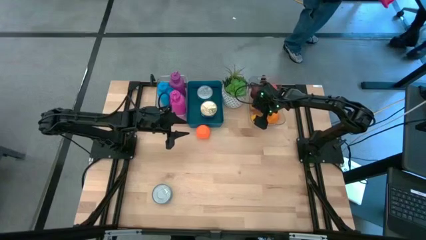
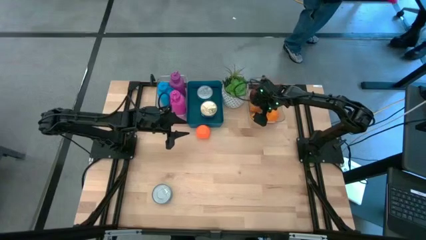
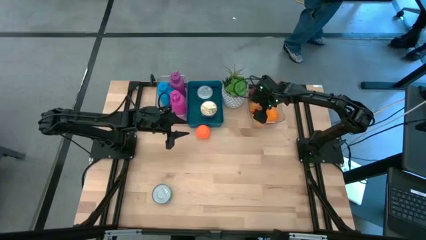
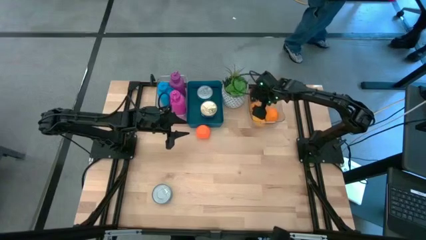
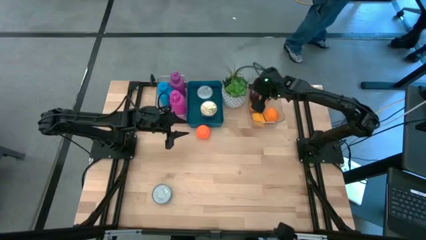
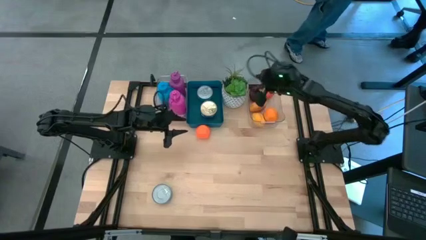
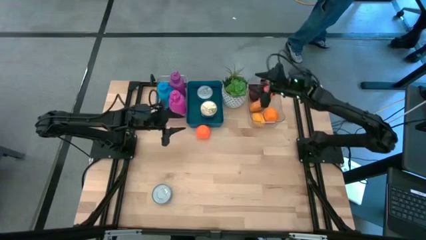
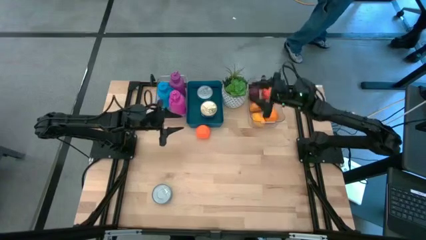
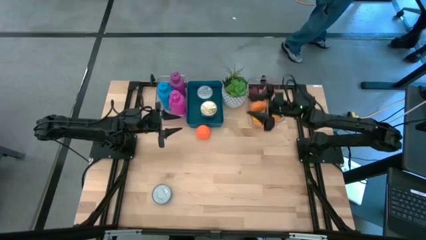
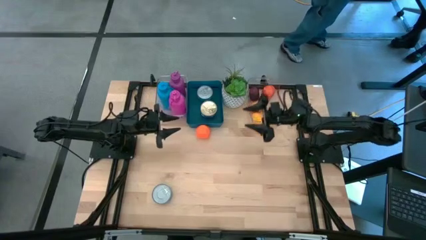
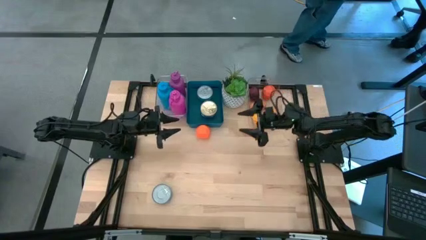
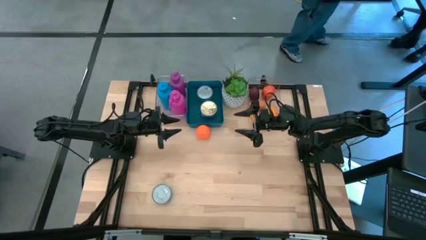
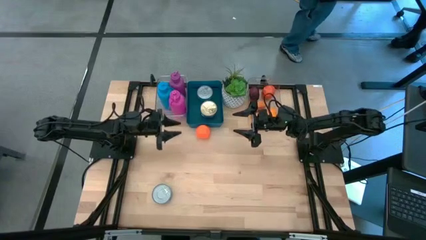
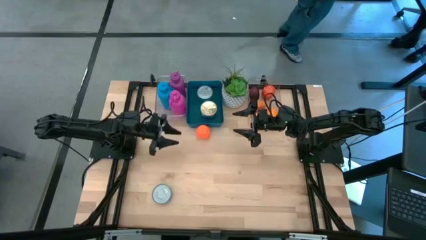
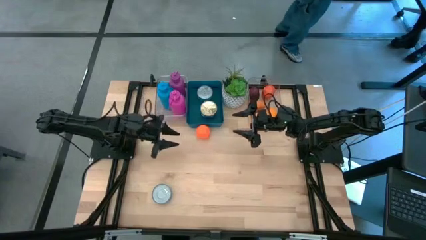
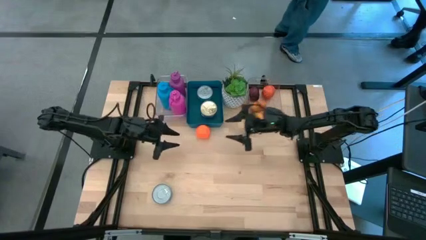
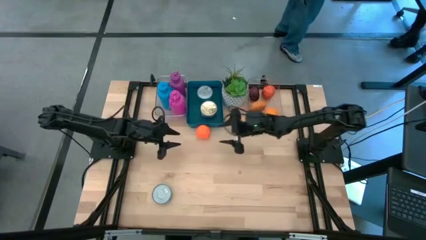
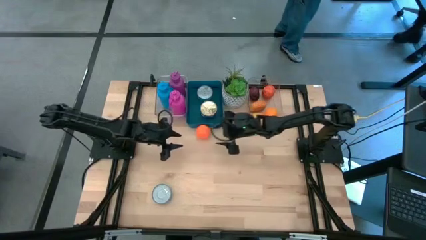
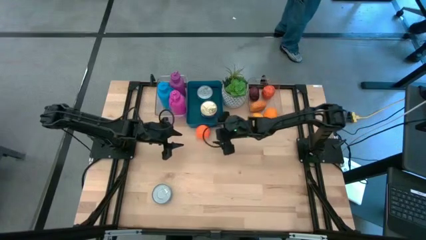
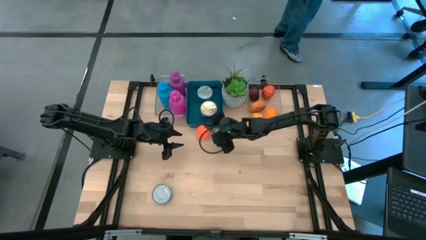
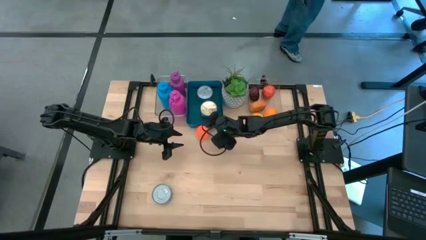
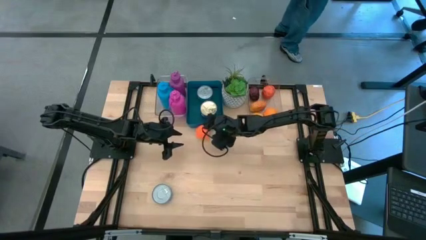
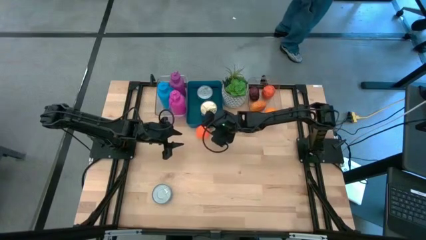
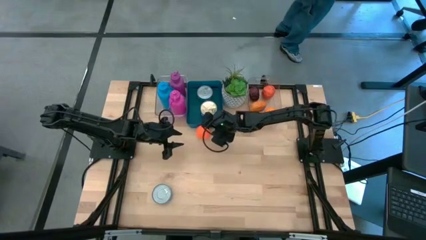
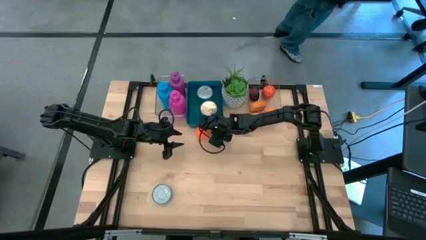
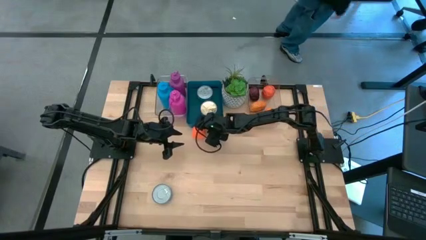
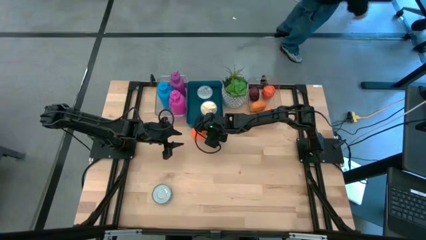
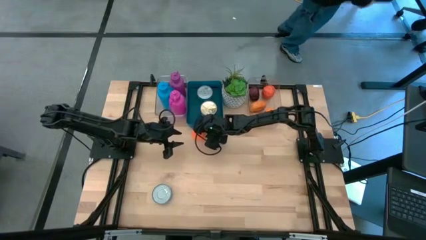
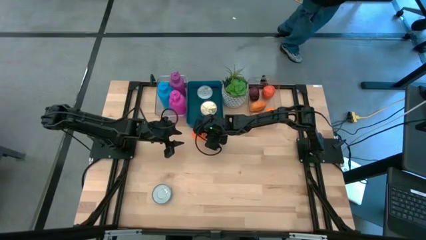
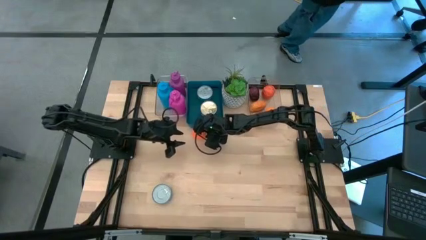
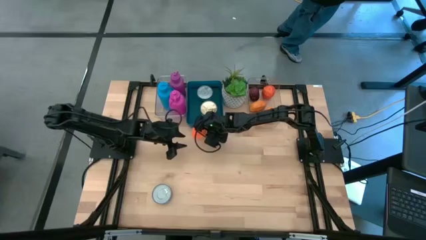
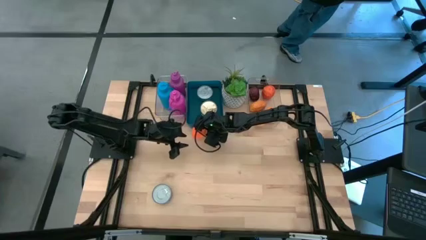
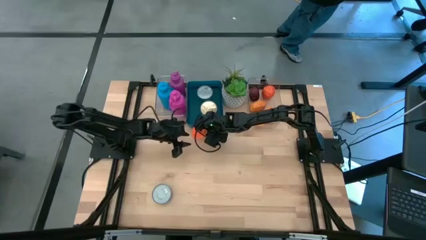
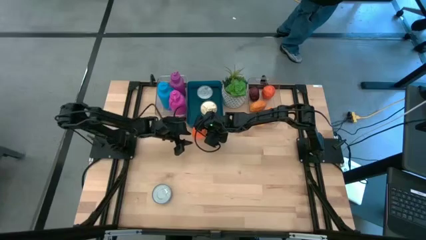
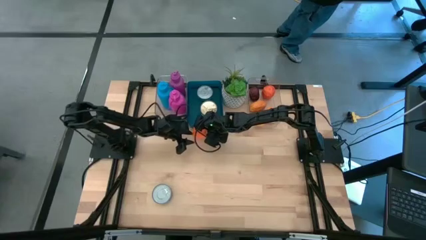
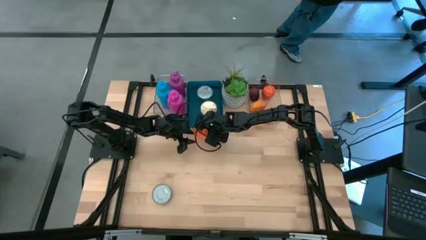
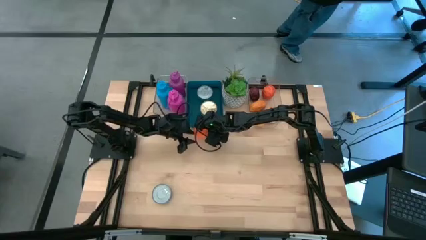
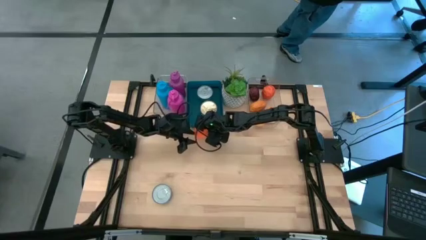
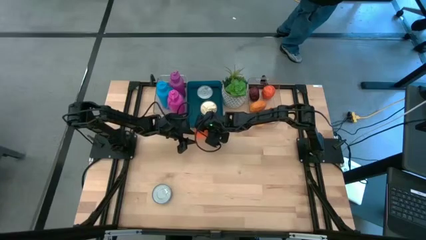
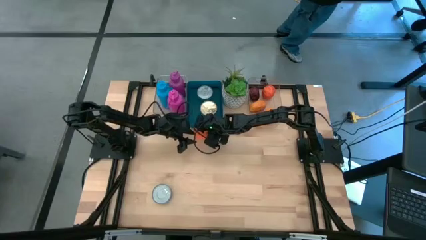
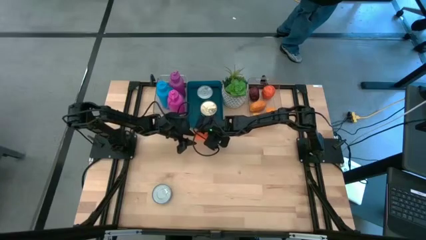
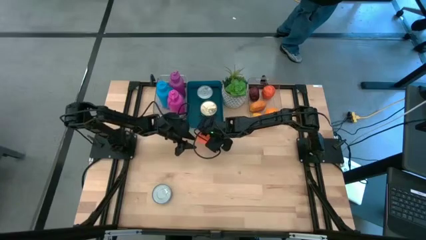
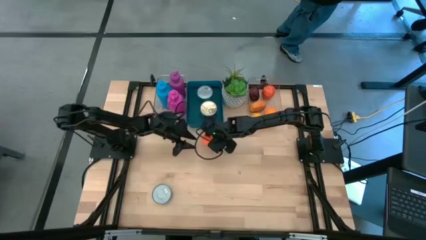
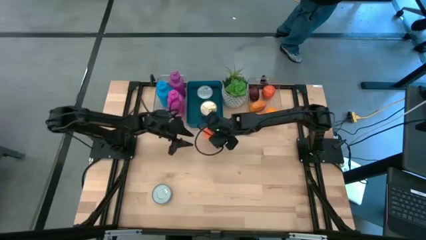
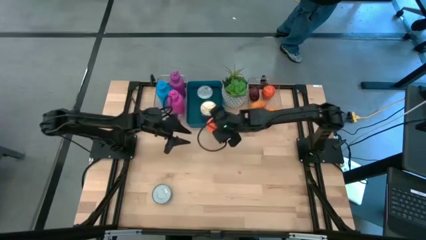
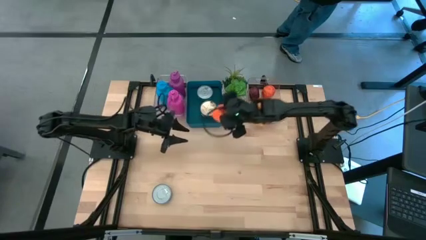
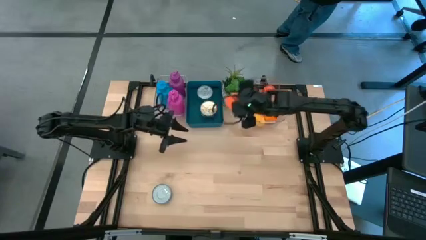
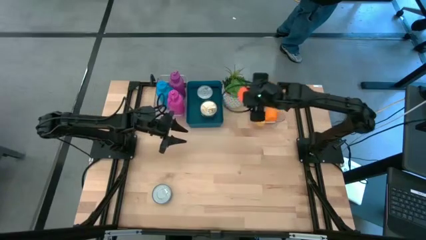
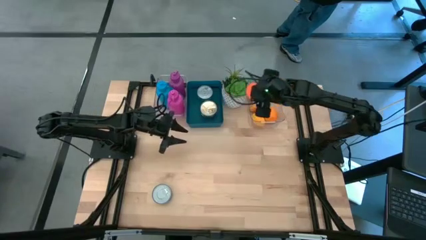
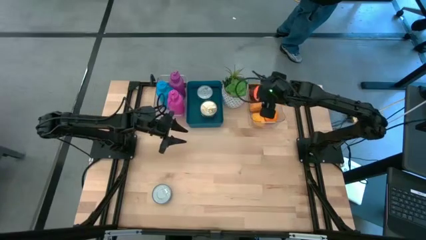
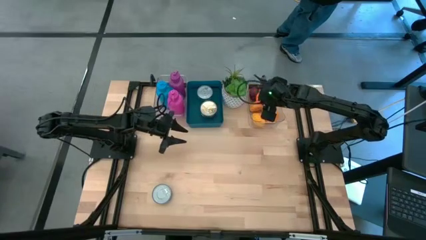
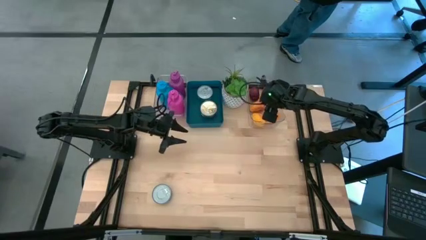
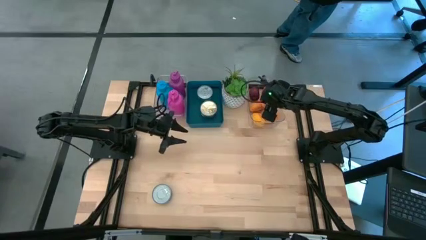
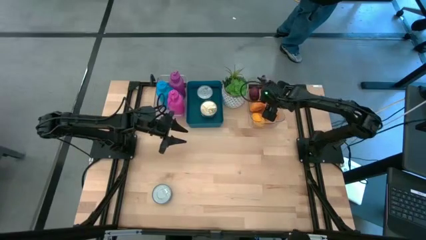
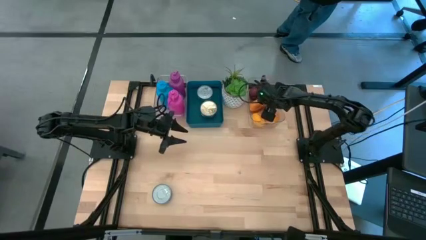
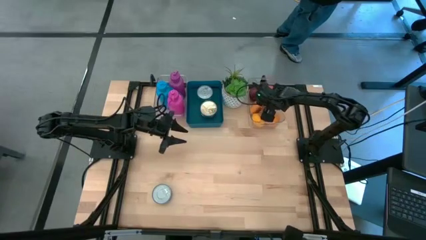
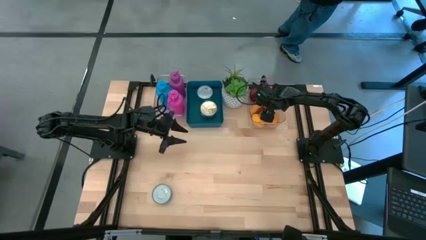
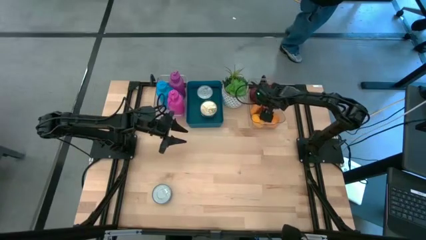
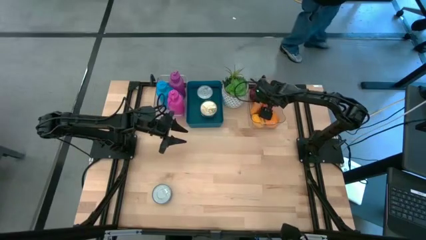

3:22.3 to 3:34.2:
Task: Pick & Place Food Item
Put the orange into the right transparent bin

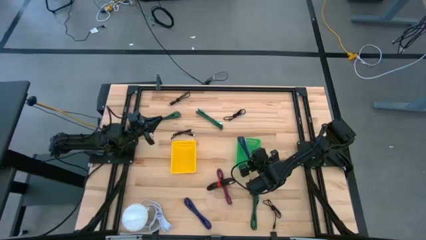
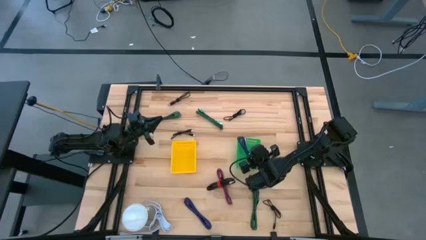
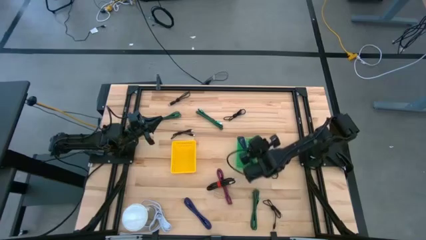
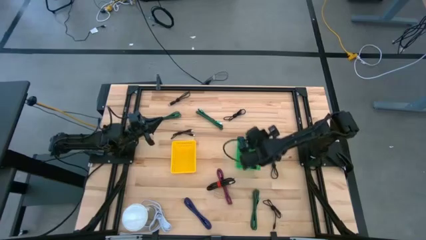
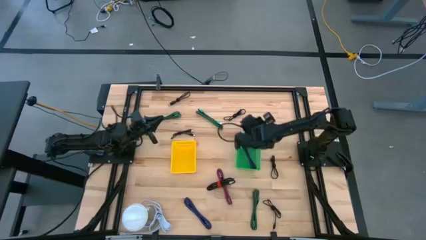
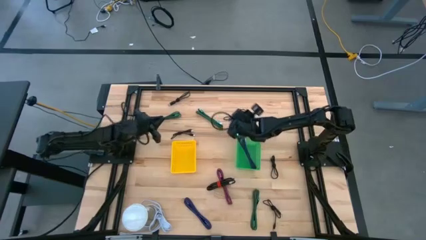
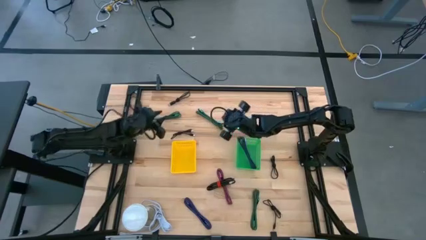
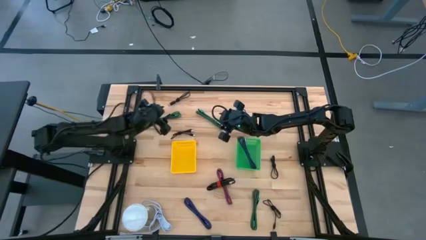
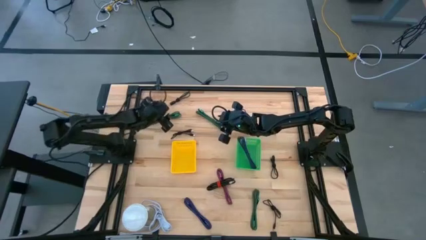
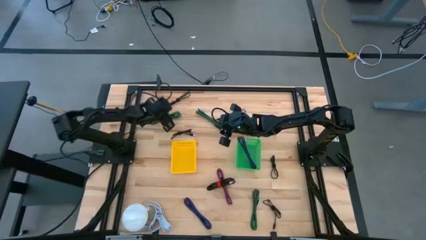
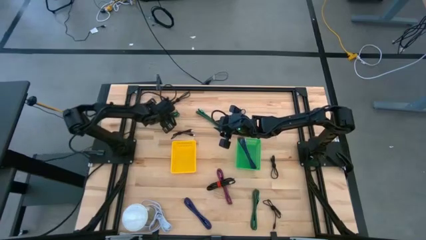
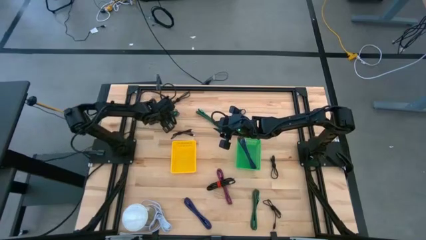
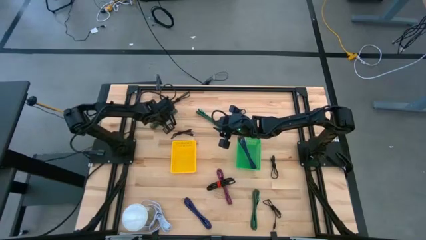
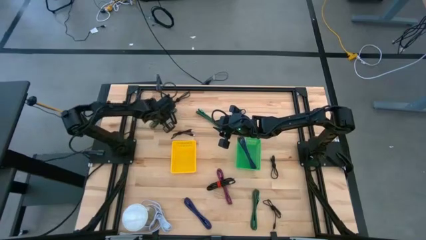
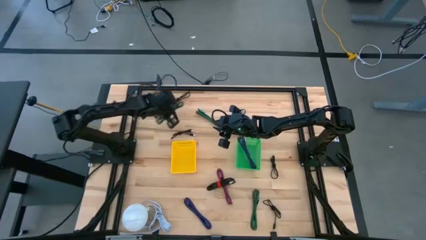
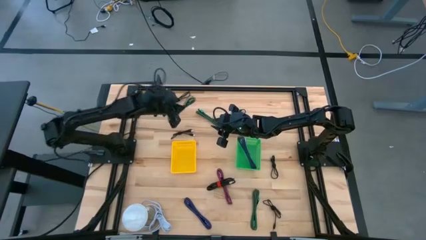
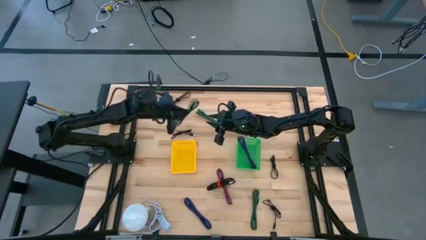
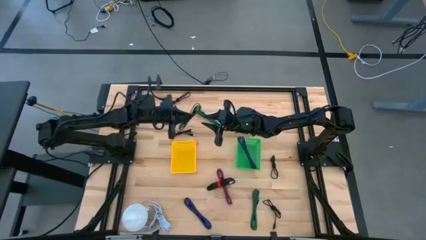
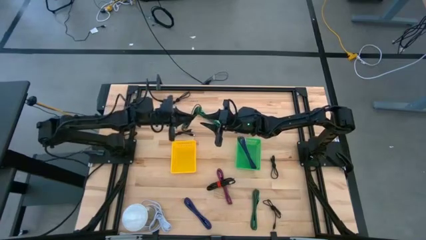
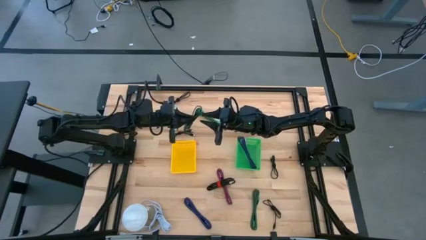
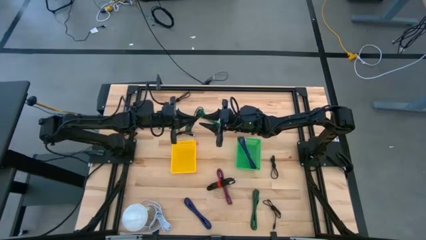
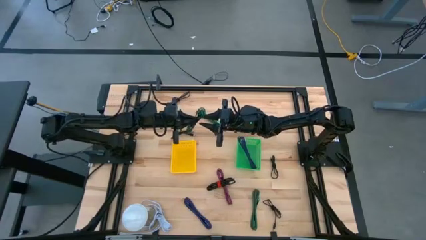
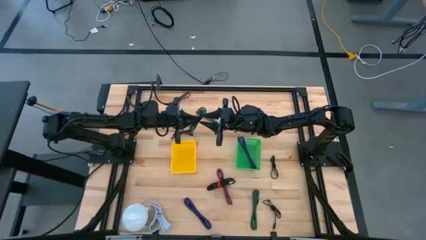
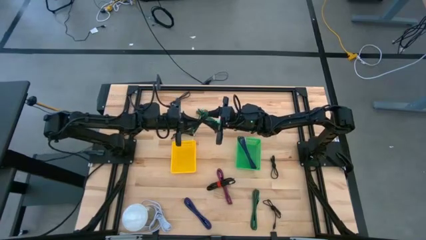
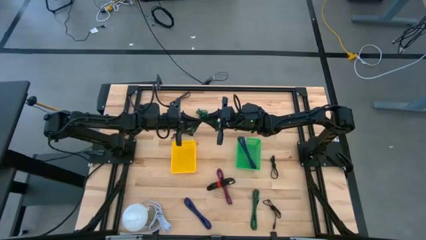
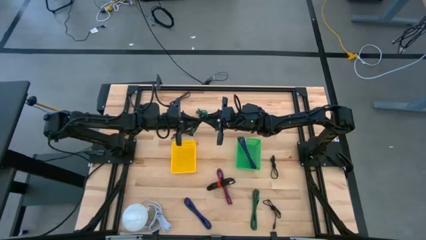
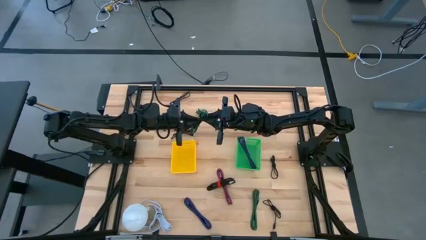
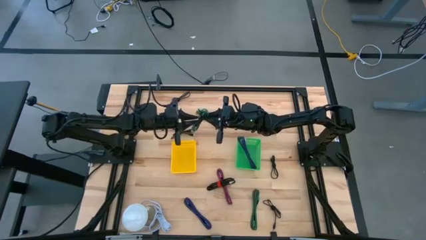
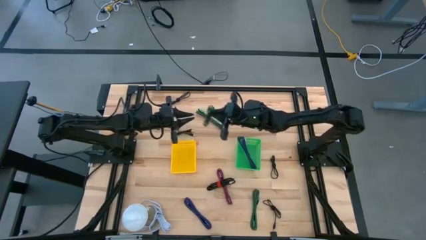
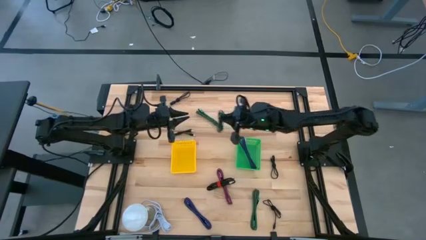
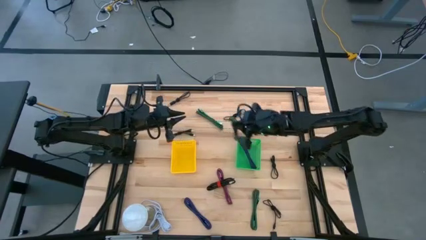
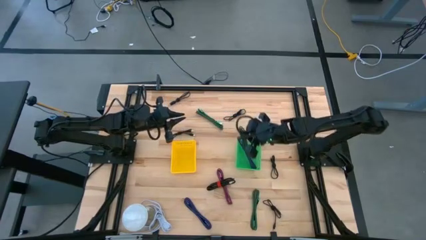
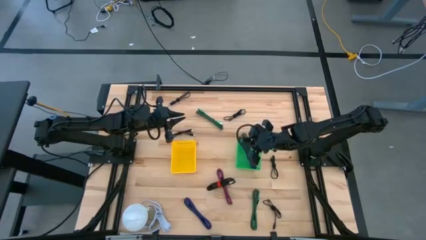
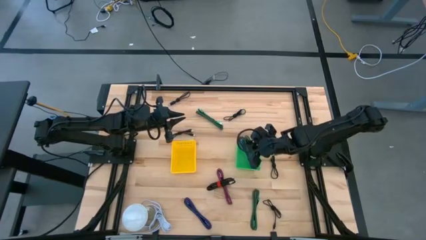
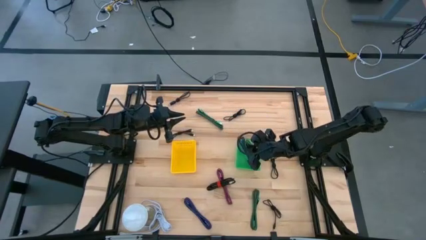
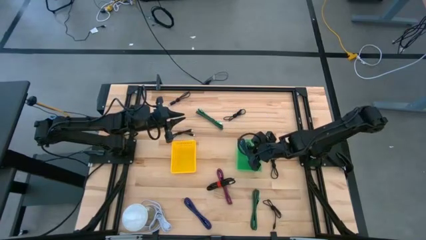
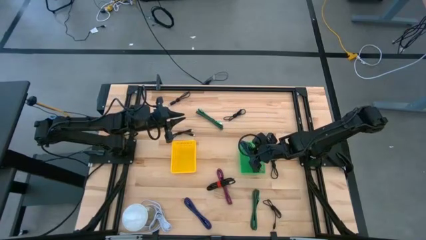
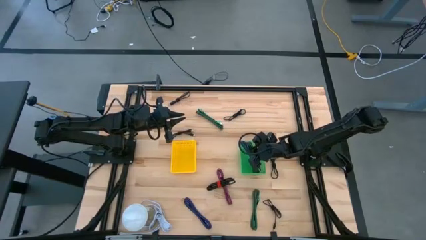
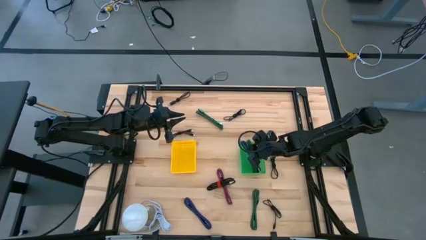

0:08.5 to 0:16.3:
Task: Pick & Place USB Port
Put the black green charger cable into the green bin
